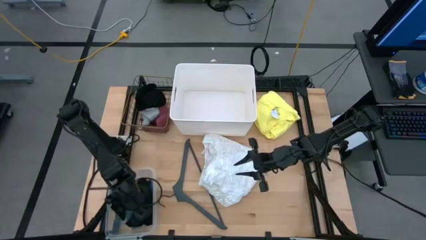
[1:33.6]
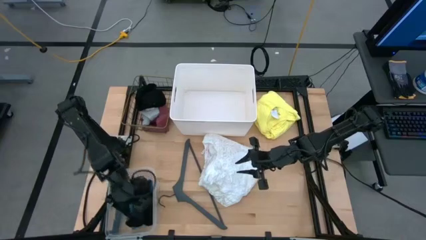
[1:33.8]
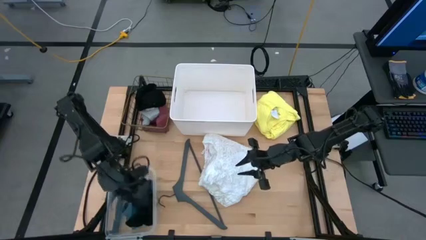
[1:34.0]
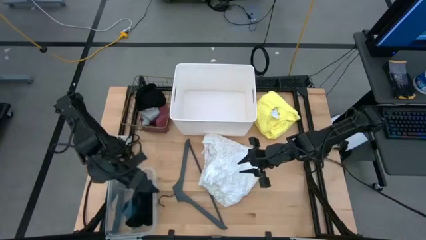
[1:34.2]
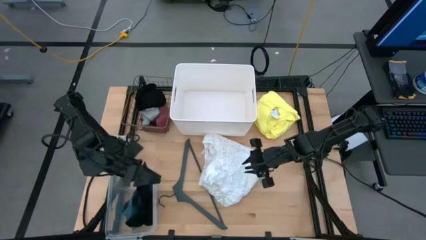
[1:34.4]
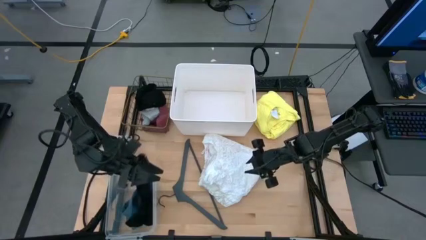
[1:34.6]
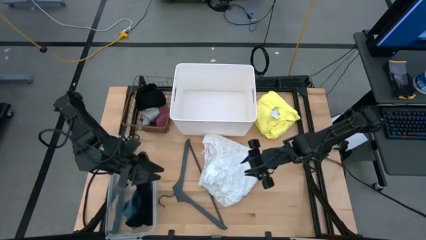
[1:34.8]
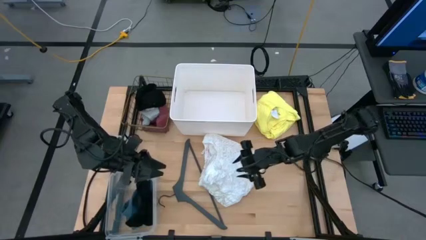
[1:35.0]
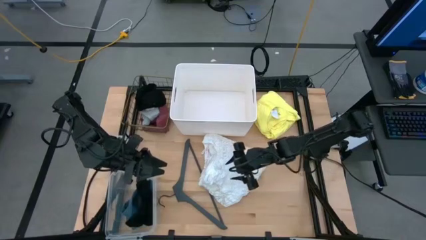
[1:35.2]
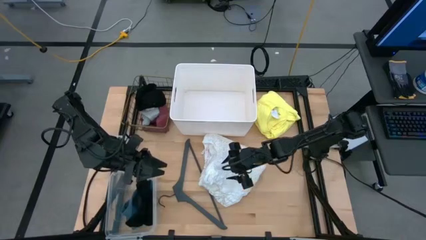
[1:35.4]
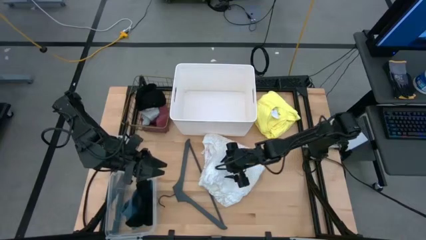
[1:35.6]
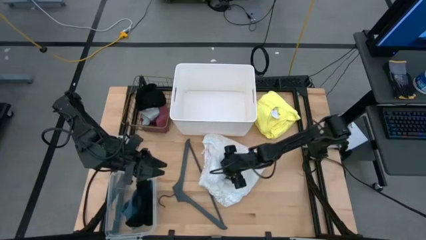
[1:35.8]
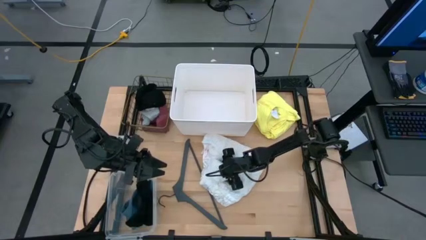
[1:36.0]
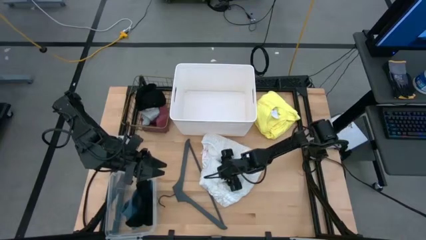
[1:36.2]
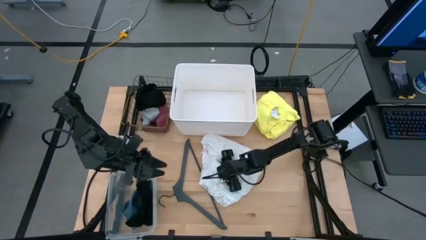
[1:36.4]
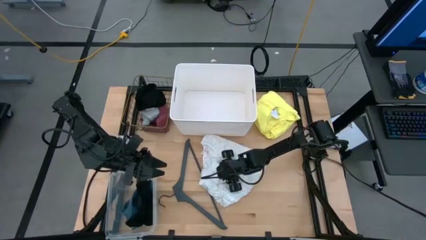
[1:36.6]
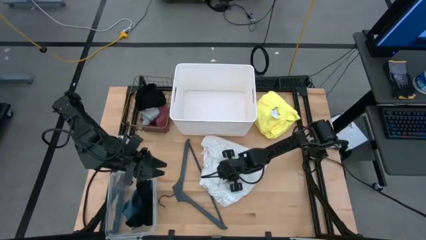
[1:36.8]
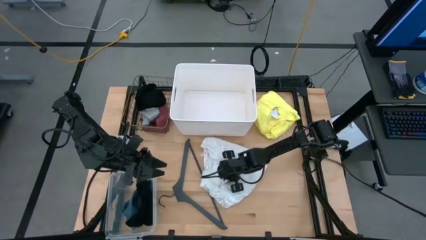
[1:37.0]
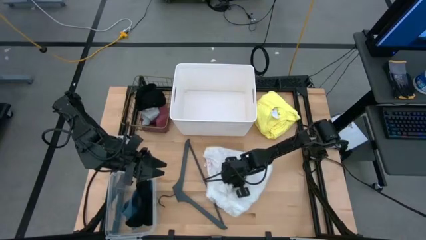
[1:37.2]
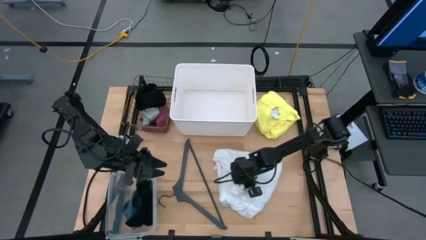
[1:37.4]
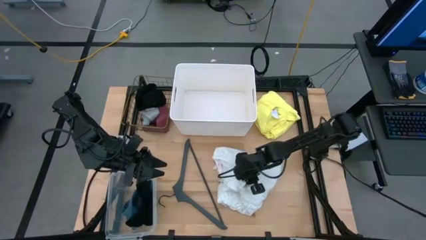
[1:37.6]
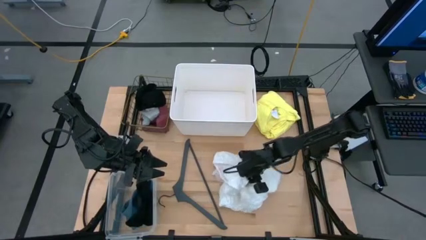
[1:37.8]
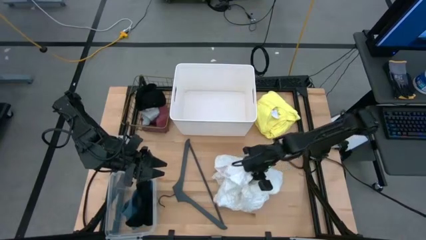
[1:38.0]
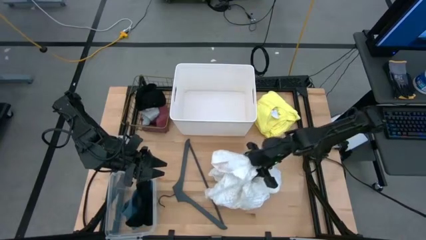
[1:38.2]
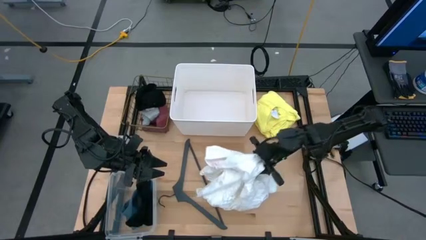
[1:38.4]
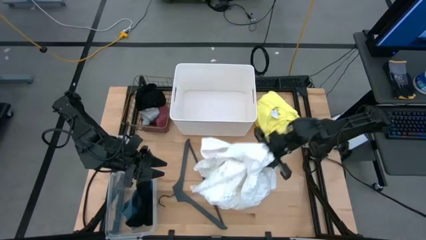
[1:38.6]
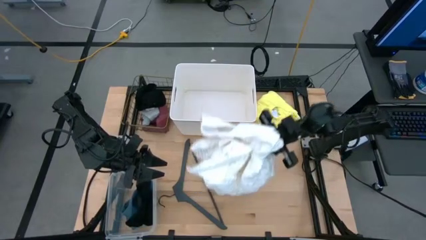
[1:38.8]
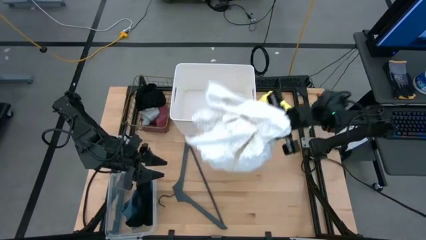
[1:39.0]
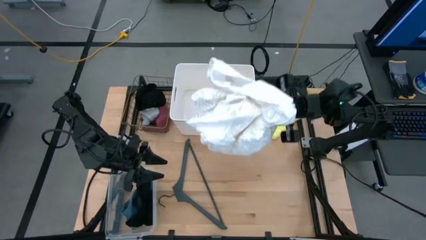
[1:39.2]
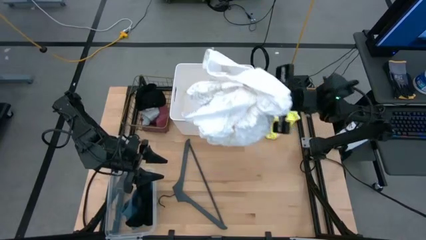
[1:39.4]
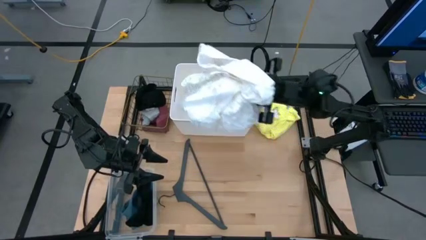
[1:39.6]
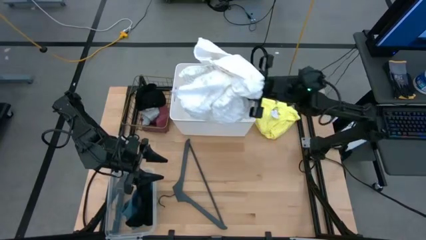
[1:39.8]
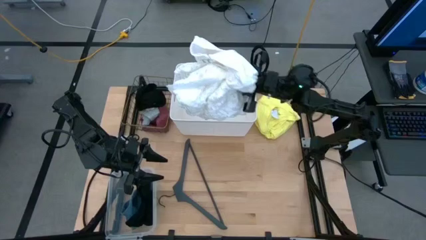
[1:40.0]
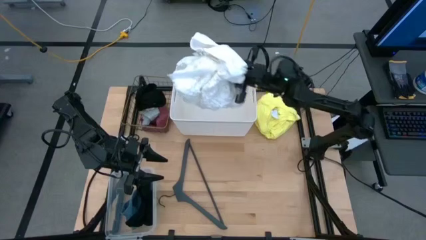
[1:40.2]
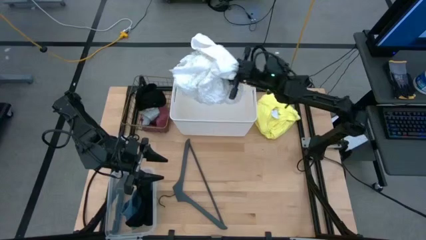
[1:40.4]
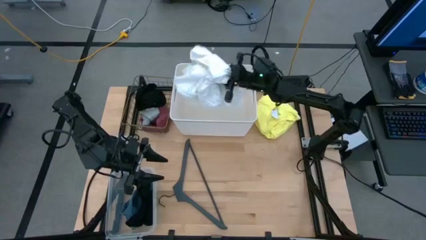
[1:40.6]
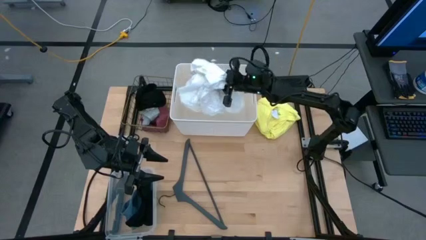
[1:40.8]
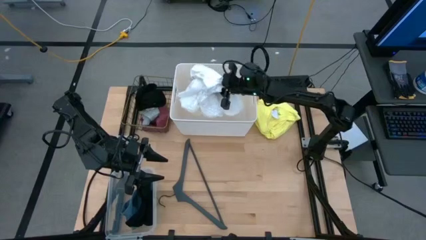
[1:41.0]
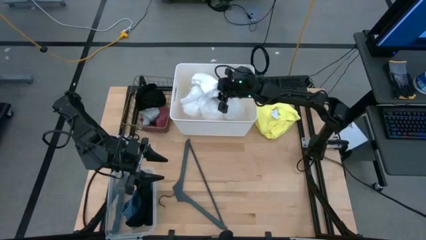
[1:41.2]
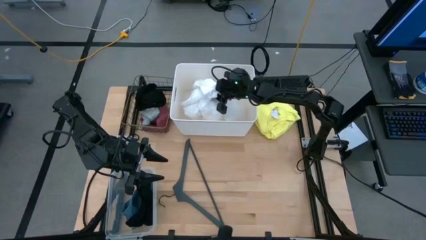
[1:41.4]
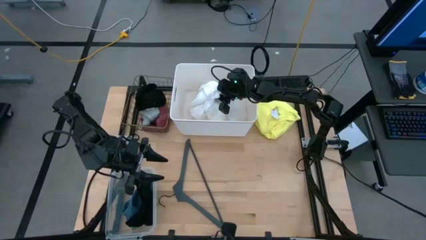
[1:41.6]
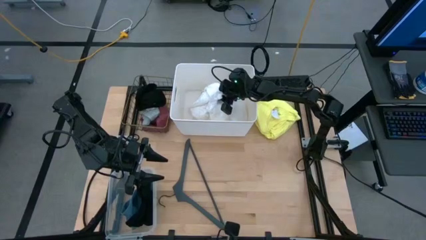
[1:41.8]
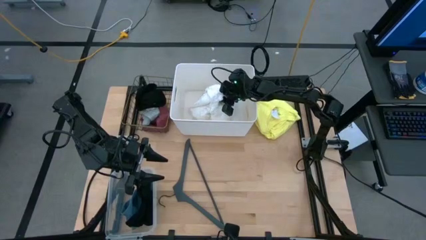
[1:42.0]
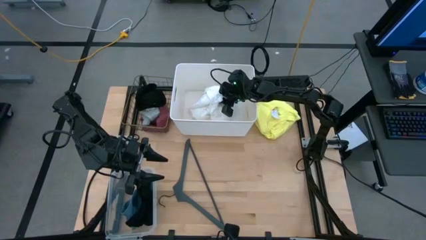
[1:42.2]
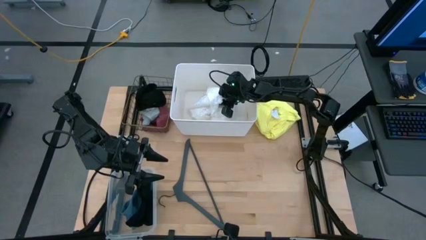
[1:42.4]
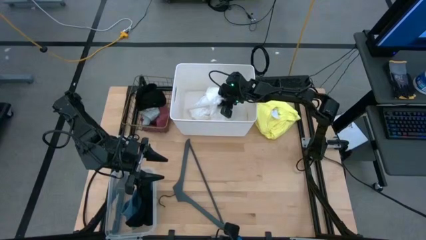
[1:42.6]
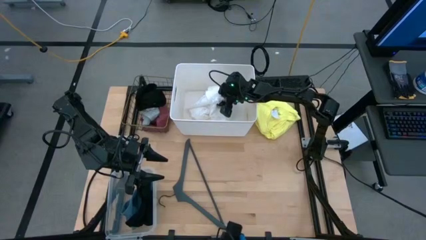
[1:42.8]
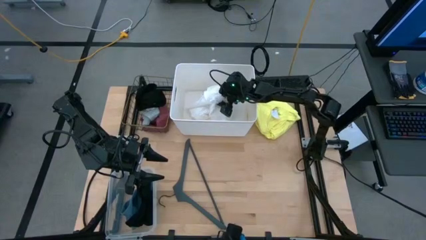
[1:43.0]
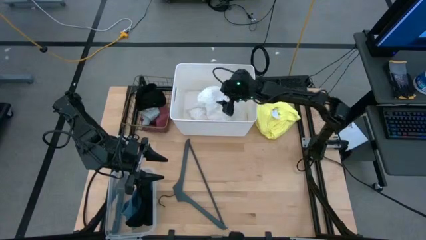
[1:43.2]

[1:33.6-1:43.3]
Task: Pick & Place Cloths
Put the white shirt into the white bin

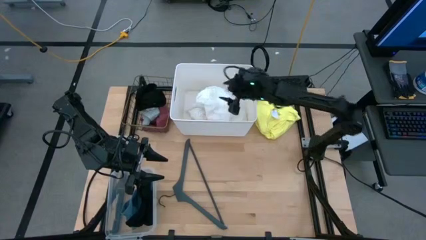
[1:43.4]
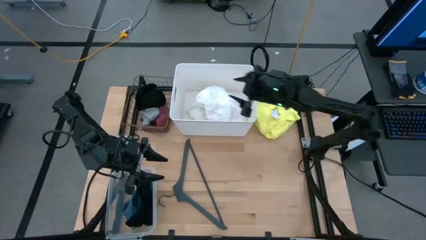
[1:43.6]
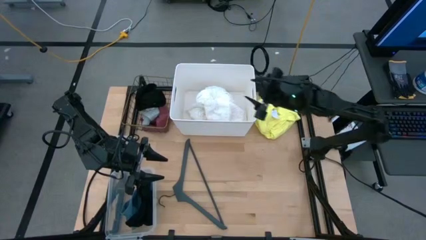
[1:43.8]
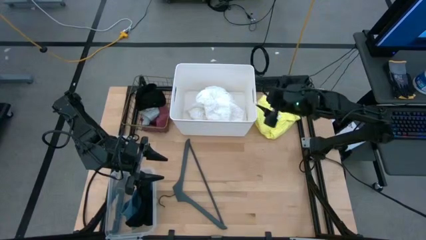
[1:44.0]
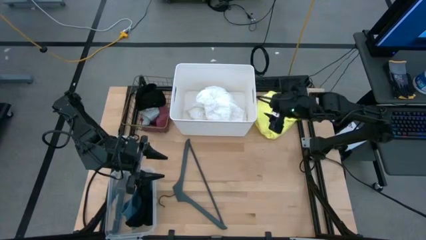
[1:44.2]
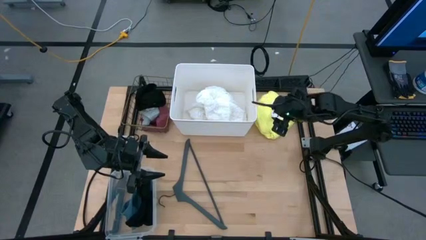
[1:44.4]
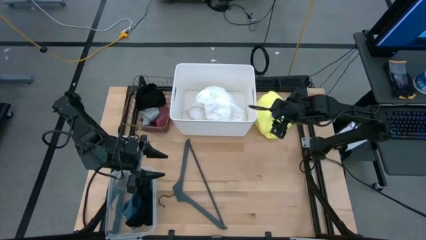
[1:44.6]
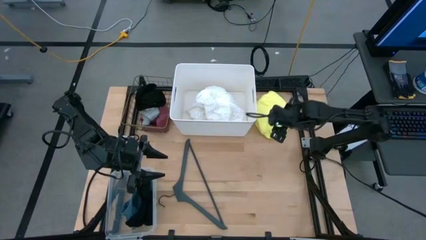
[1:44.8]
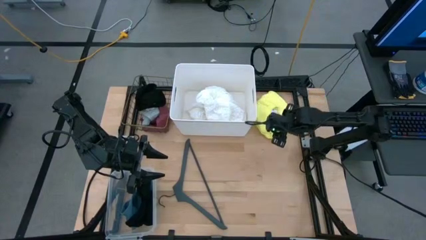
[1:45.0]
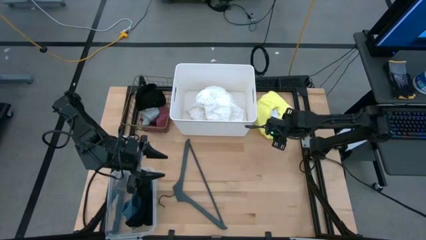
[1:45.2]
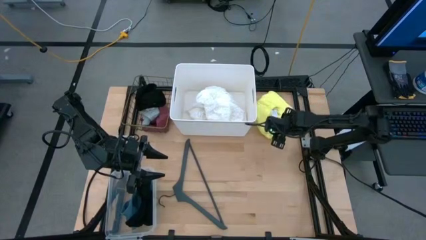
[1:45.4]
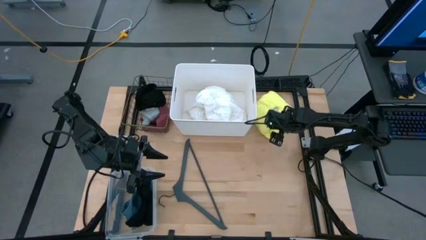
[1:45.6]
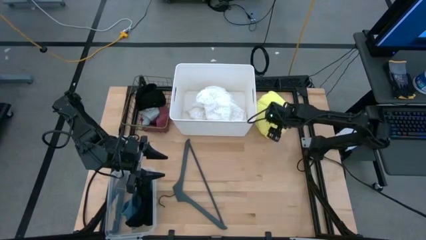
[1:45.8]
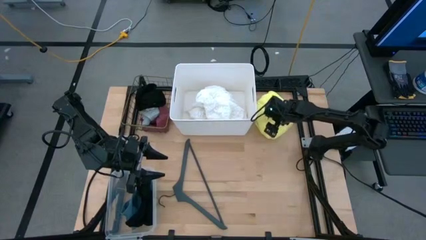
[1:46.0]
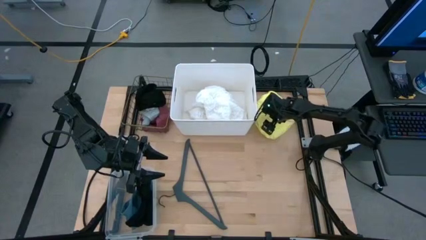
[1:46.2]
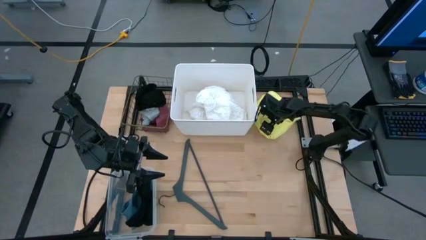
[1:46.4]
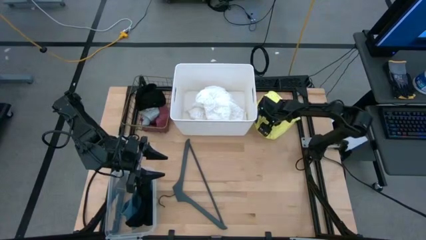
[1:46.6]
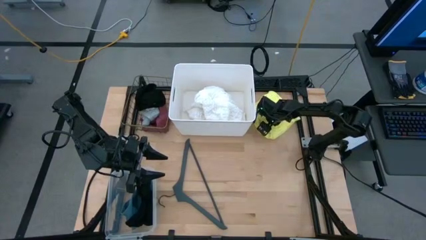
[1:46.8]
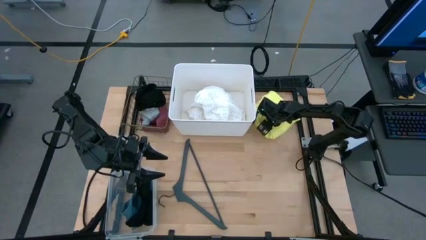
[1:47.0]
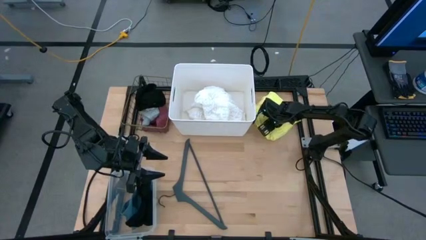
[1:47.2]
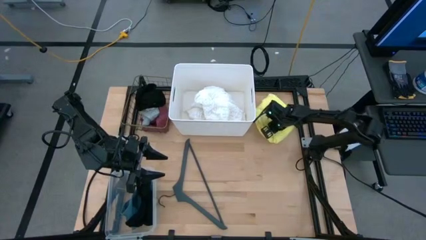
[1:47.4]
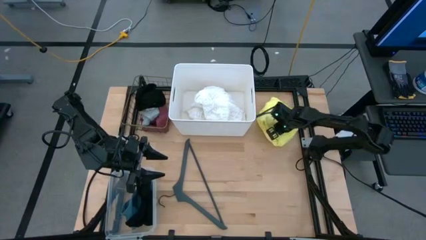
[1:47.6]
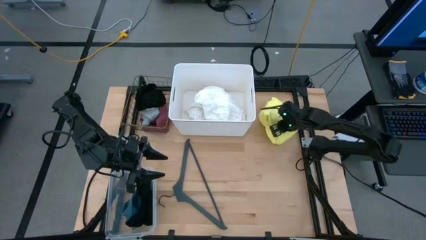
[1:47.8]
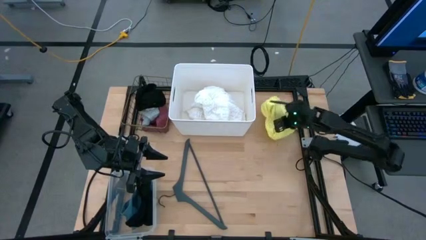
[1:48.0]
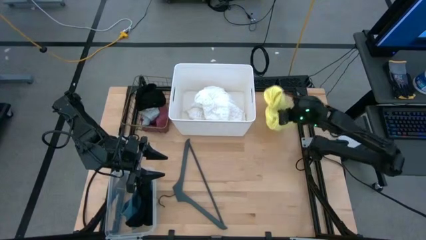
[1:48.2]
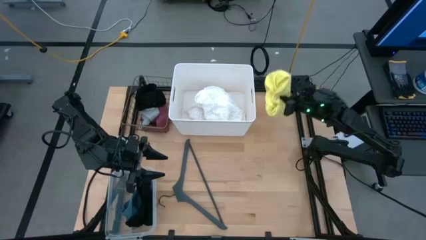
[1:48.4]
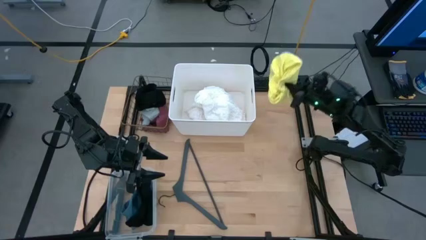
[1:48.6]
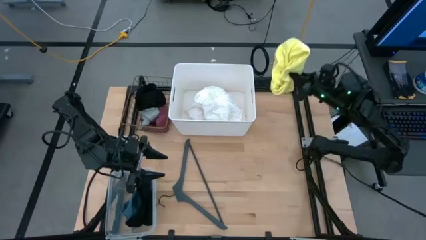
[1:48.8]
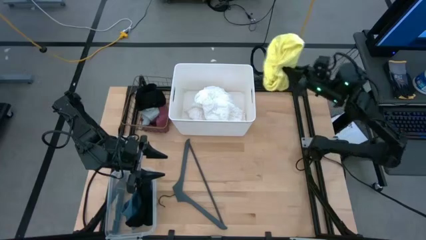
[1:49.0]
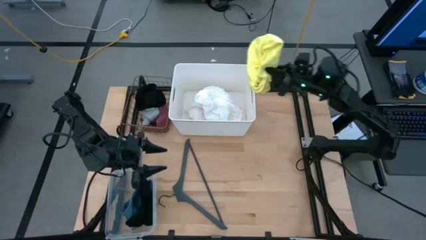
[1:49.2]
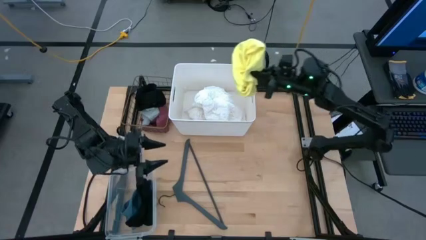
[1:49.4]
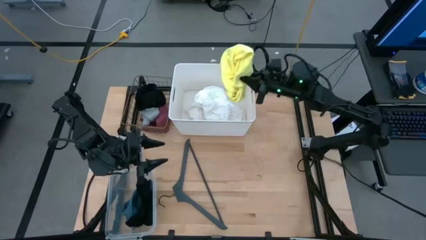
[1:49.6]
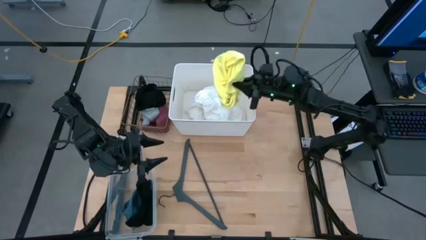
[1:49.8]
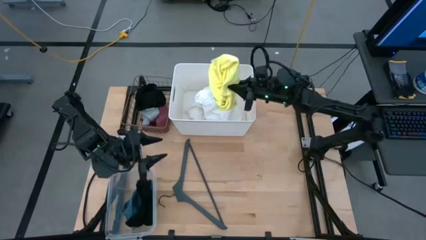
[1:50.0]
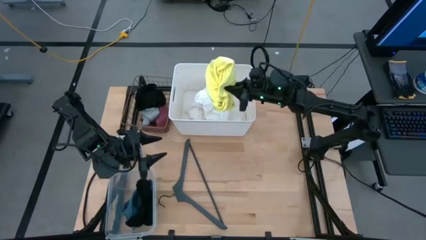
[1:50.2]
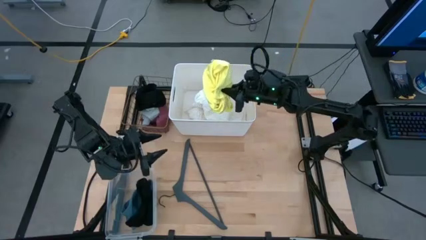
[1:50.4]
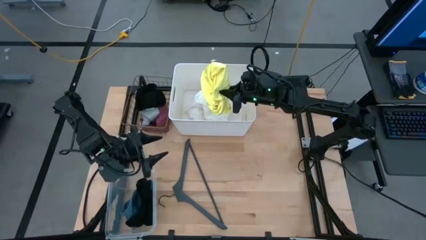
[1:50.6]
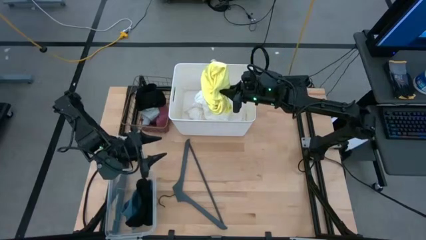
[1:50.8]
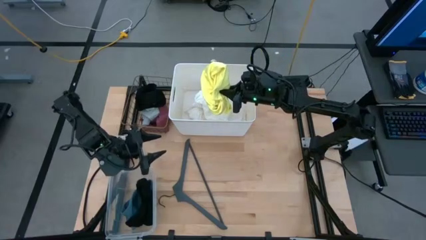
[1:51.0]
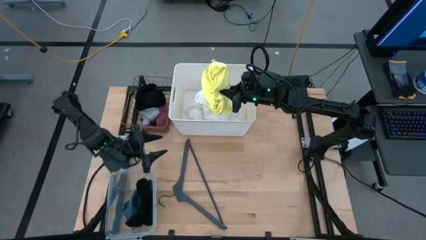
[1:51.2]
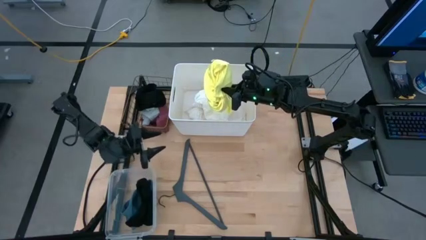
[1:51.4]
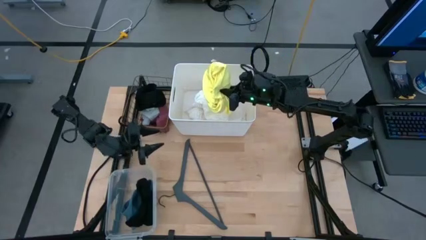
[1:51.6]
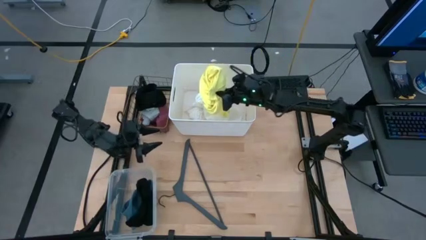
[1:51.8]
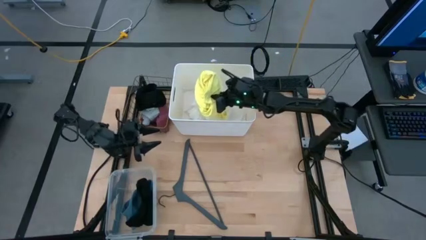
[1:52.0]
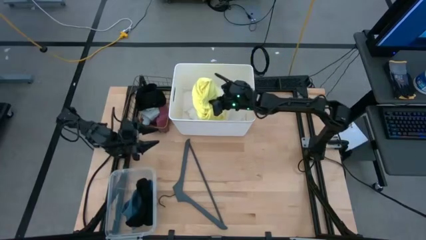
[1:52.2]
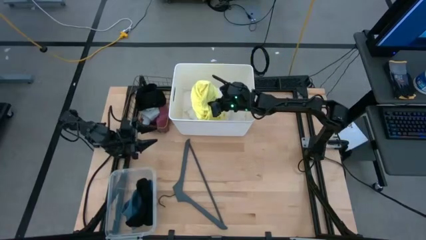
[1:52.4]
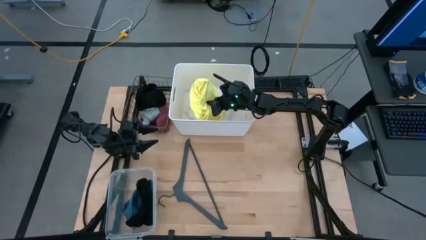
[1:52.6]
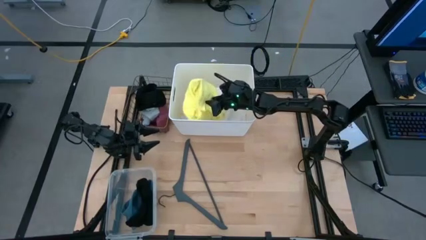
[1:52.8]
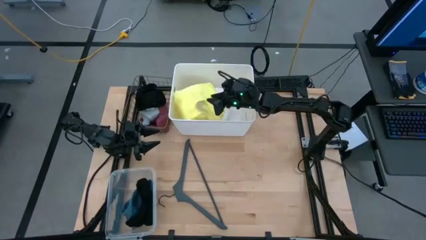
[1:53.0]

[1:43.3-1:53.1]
Put the yellow shirt into the white bin
